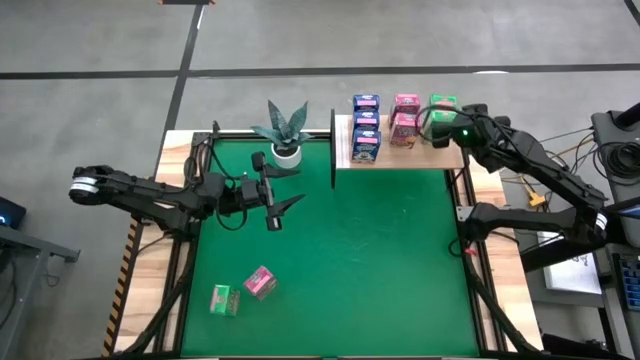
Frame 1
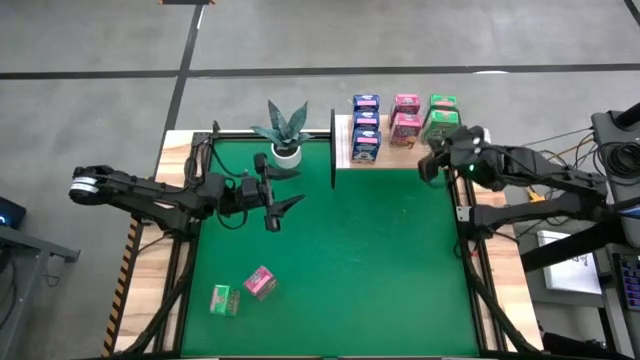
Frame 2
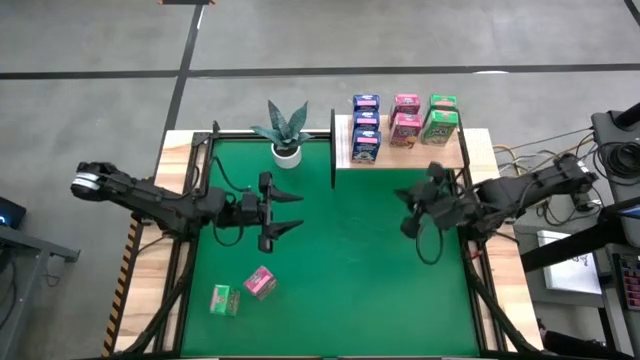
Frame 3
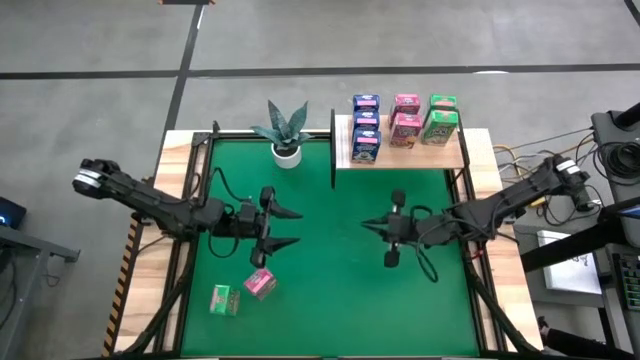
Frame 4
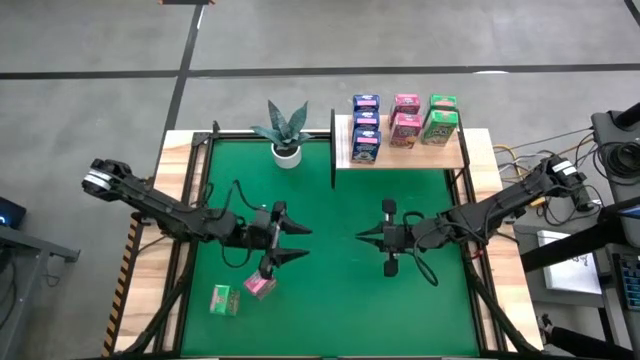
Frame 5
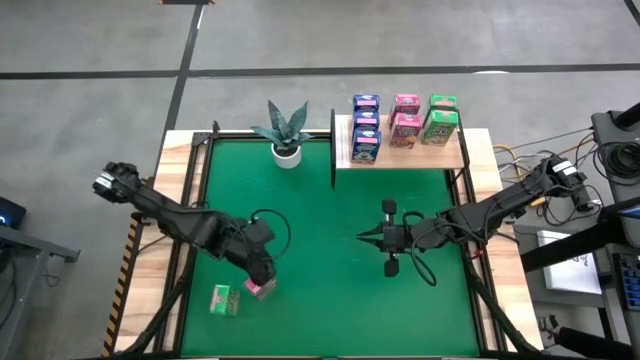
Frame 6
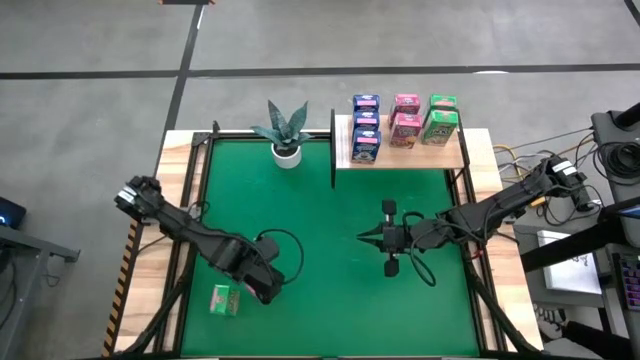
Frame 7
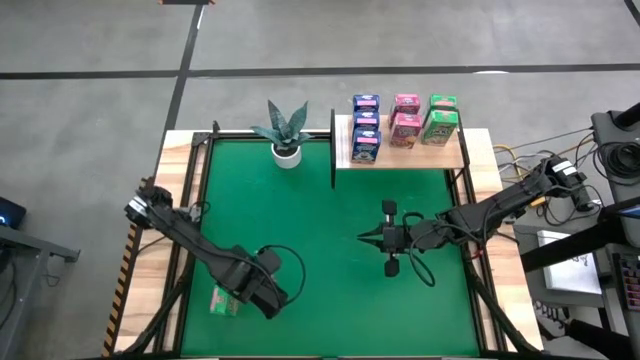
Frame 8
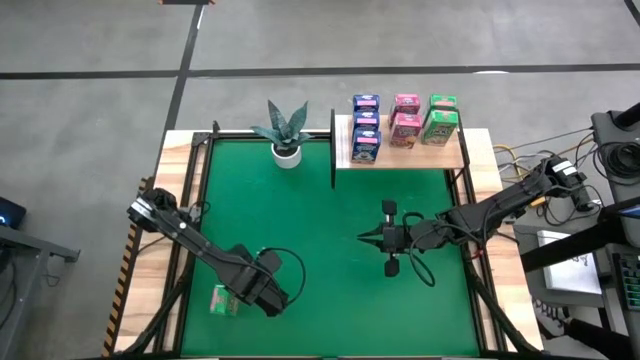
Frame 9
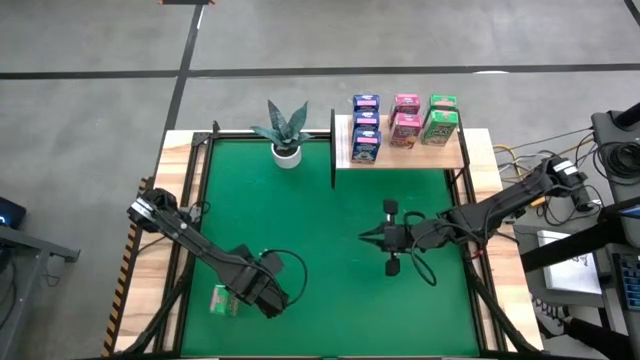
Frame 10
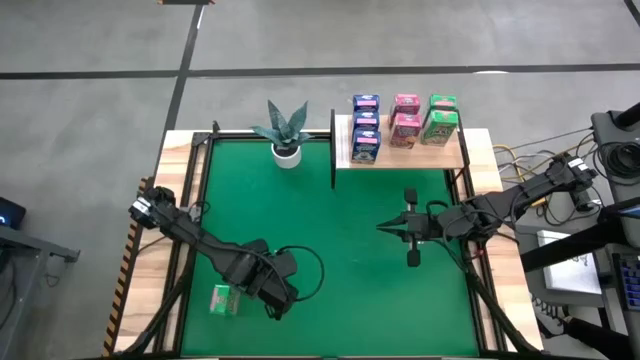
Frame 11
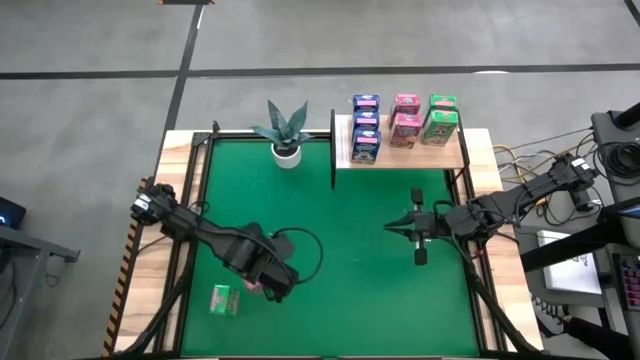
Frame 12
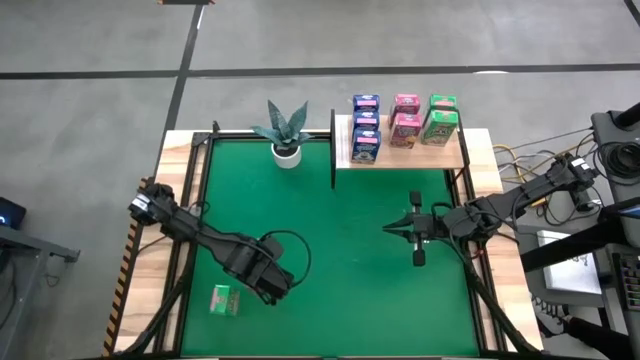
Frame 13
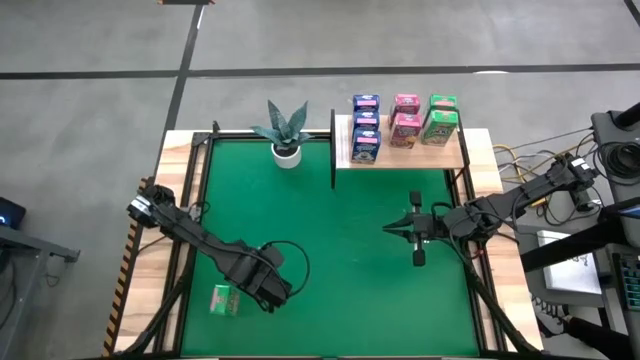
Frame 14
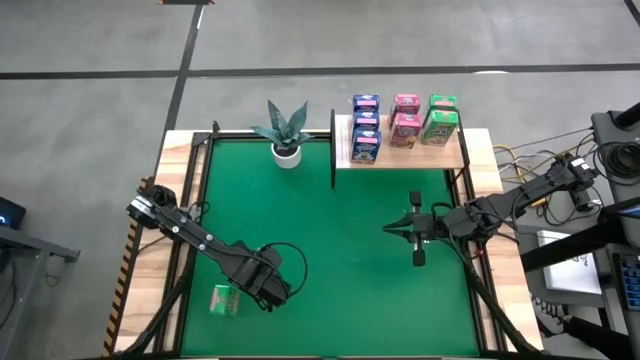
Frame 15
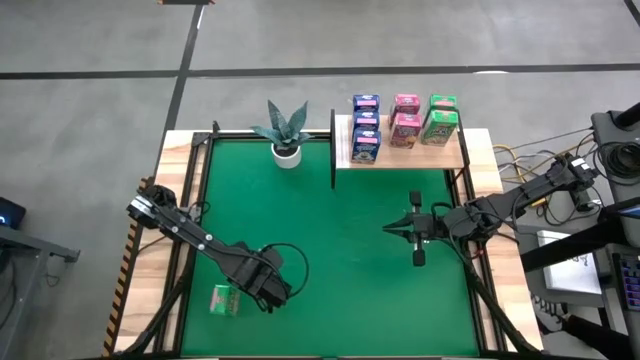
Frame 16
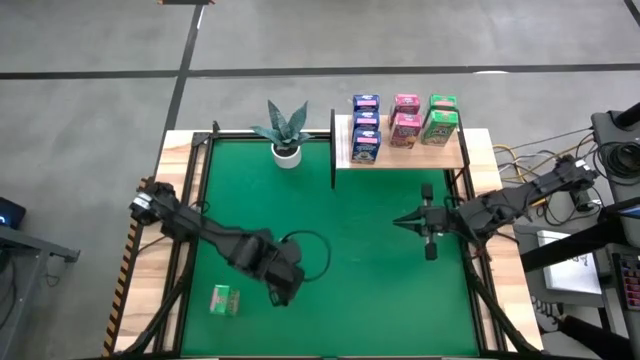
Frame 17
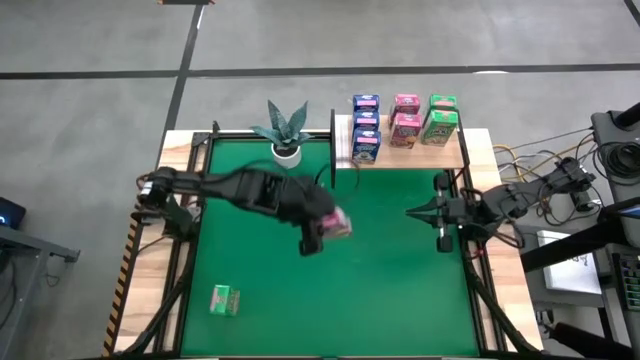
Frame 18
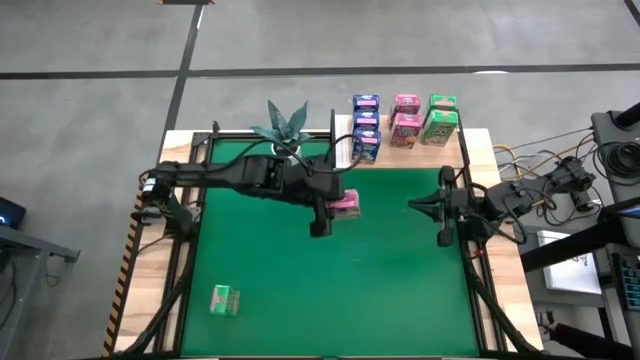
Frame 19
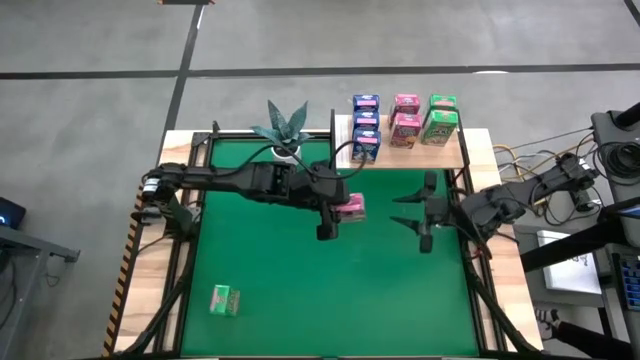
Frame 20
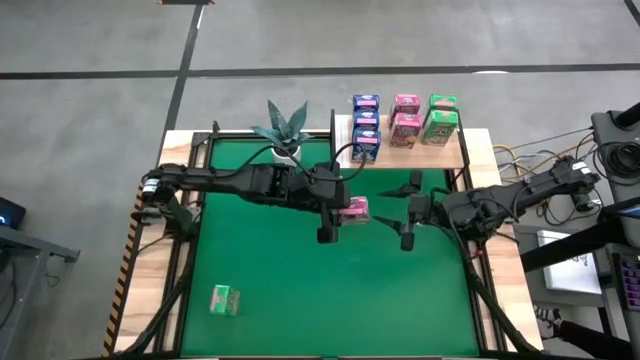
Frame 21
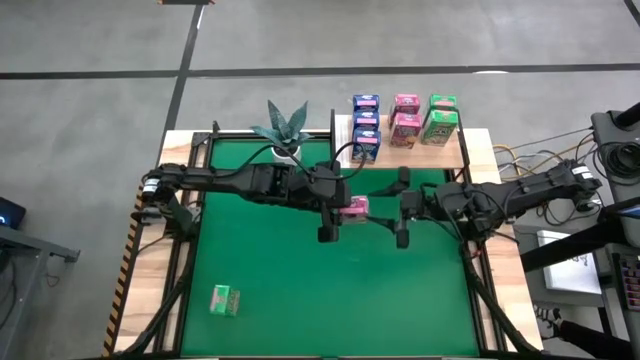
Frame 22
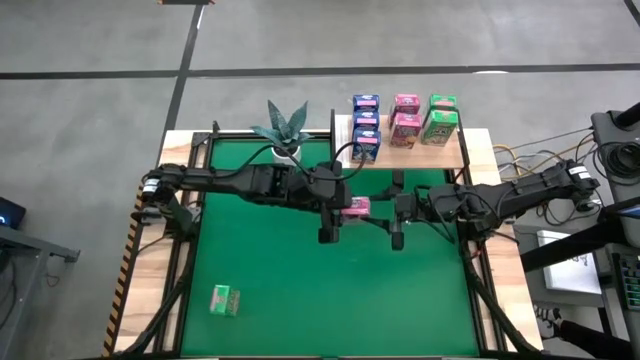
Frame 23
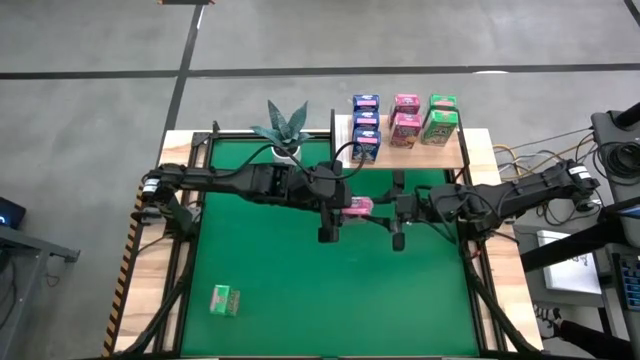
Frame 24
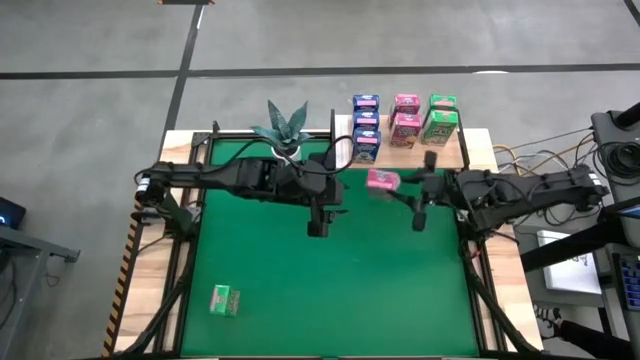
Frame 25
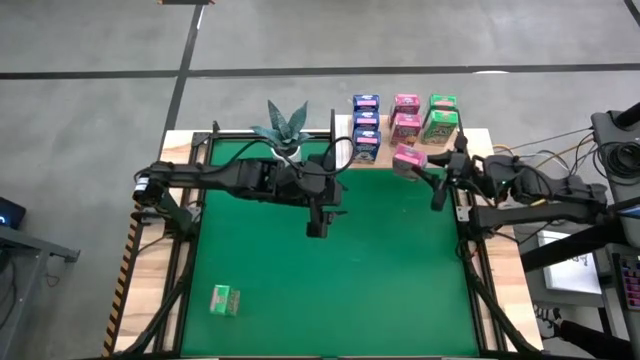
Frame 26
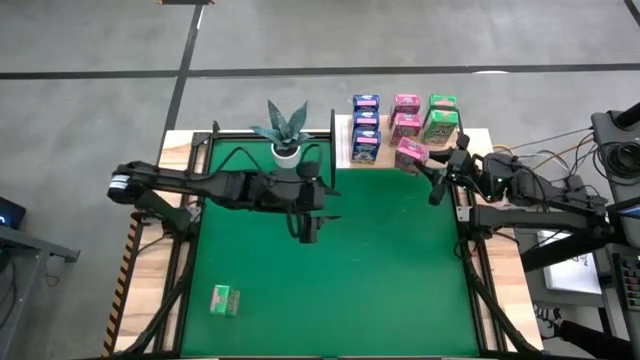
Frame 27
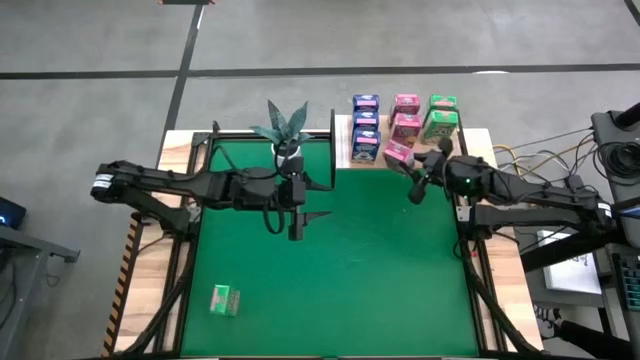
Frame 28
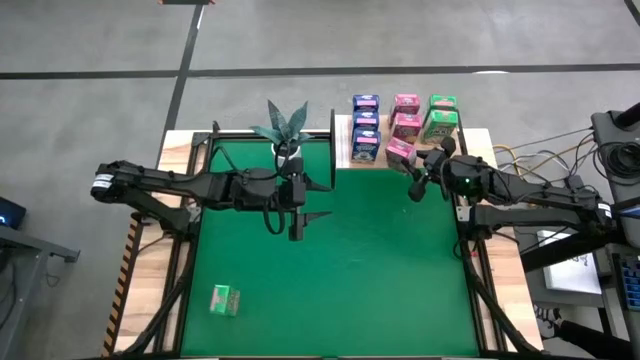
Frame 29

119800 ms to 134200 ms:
Task: Stack cereal on shelf
Put the pink cereal box on the shelf aligned with the other pink cereal boxes

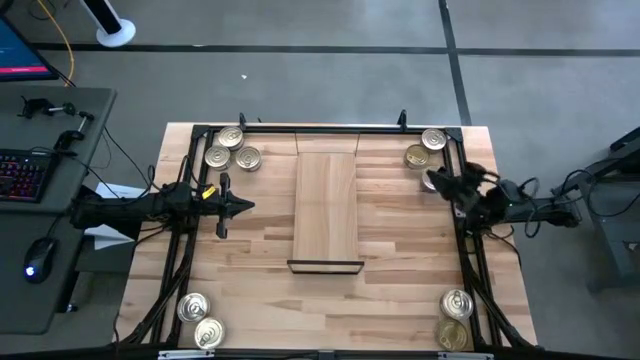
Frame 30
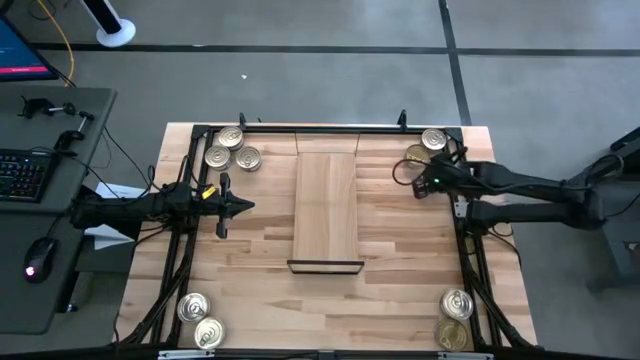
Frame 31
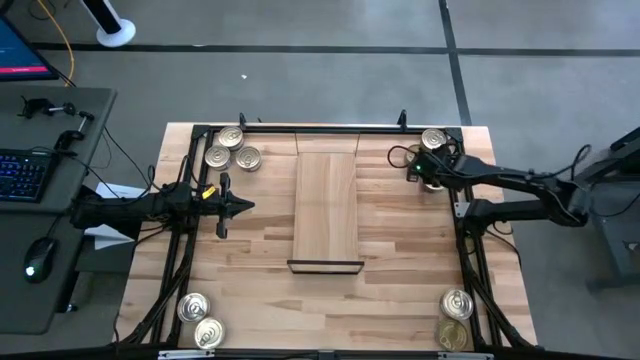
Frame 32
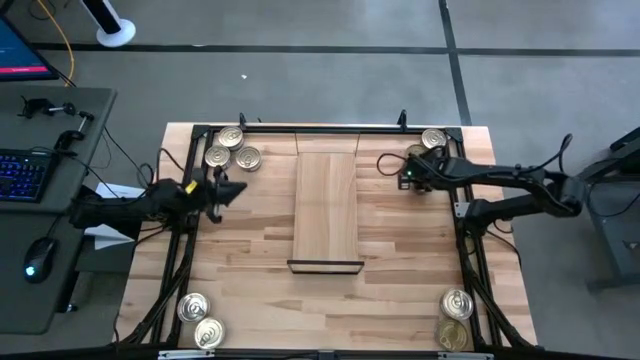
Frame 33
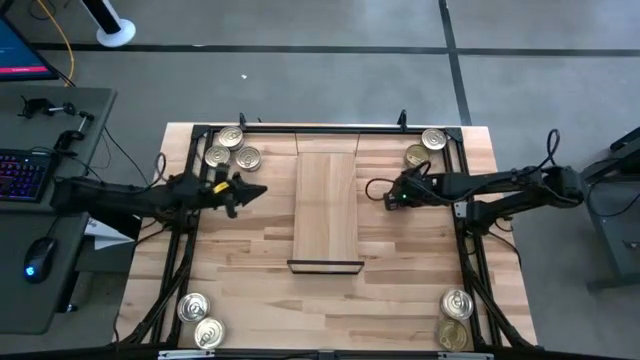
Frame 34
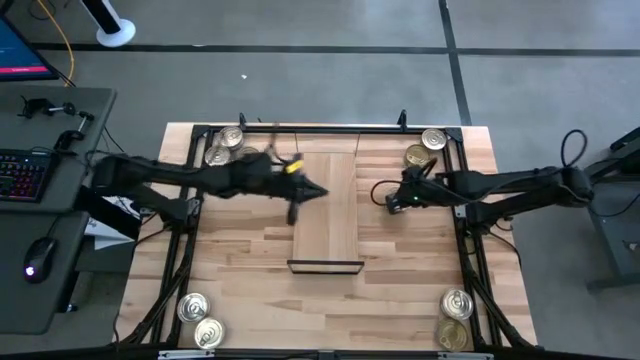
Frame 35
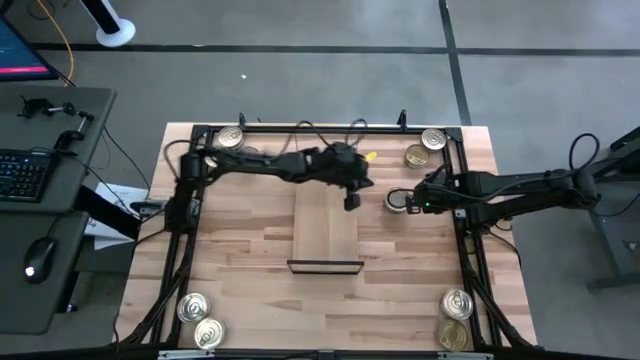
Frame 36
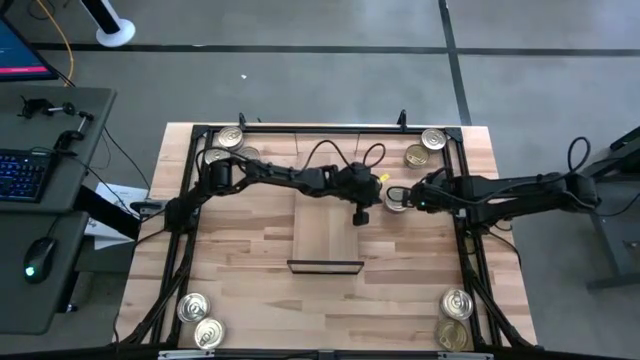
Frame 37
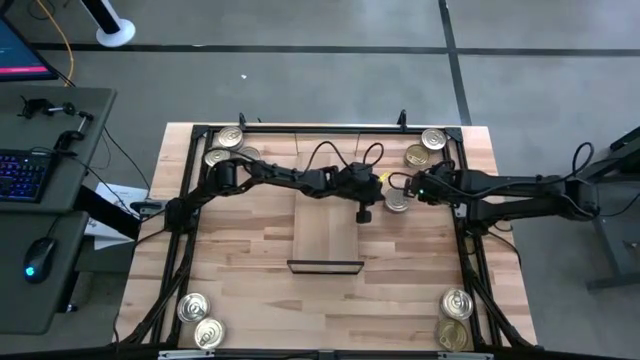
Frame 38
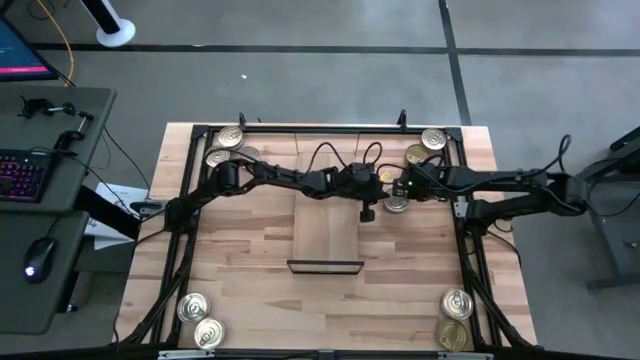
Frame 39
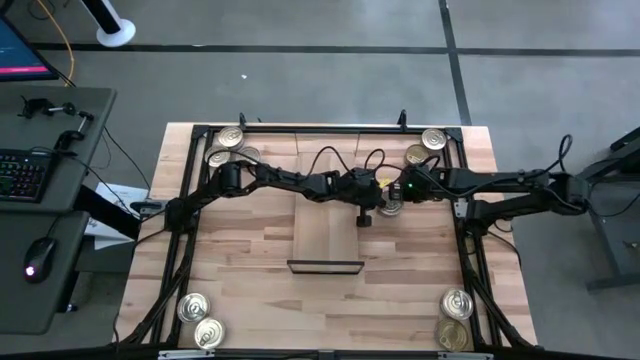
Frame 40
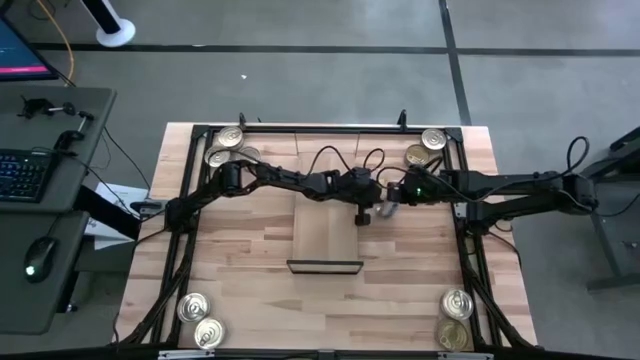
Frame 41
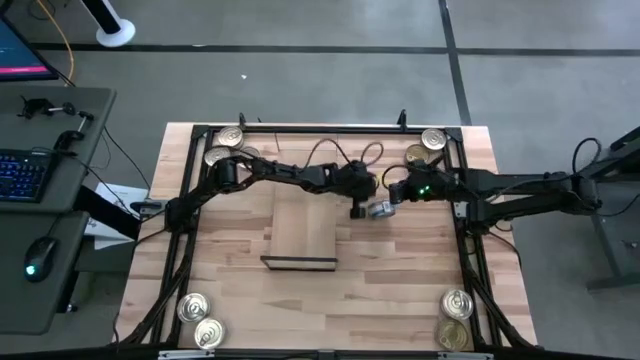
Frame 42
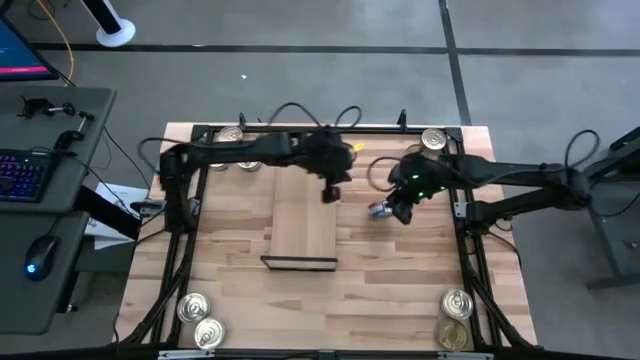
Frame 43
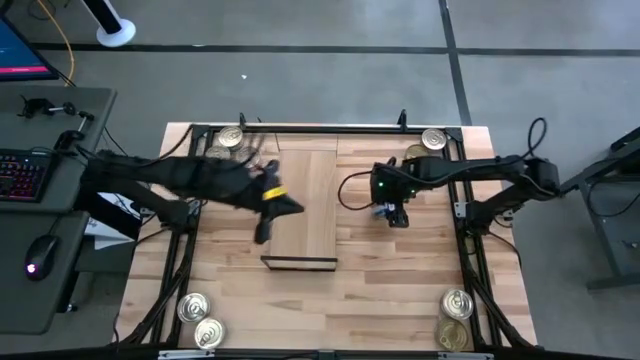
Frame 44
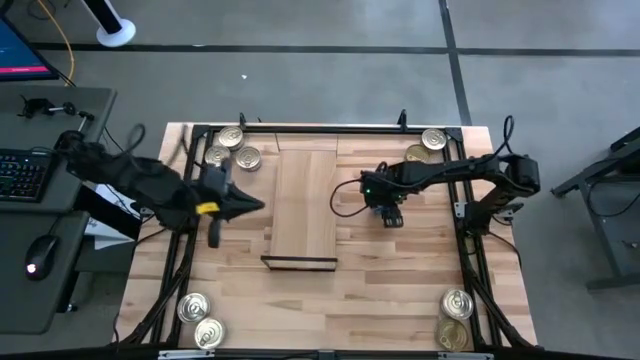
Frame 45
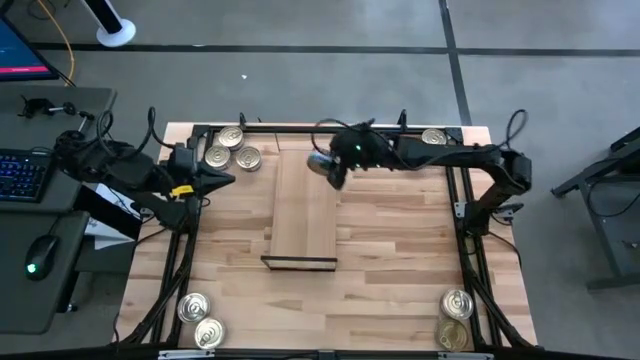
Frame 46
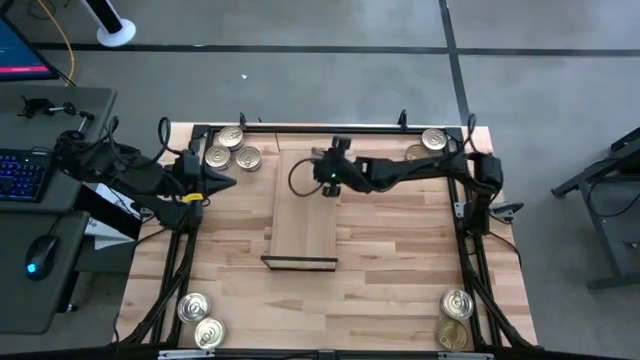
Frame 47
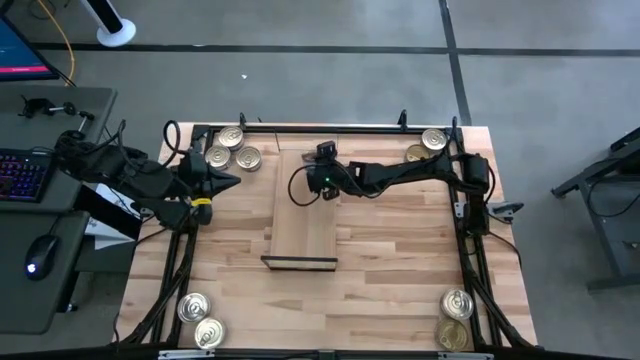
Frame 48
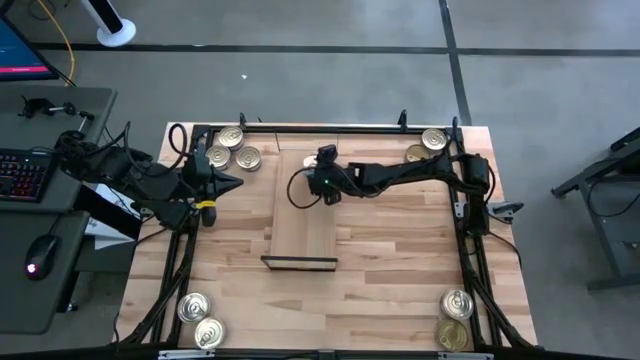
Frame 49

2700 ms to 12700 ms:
Task: Stack canned seafood by type on shelf
Put the blue pink tuna can on the shelf
